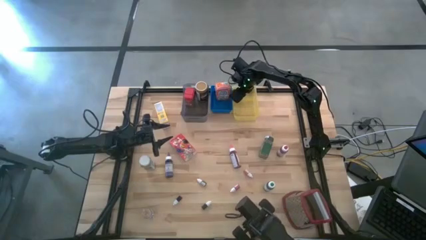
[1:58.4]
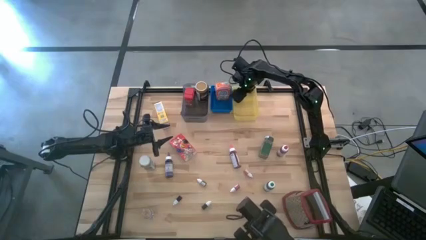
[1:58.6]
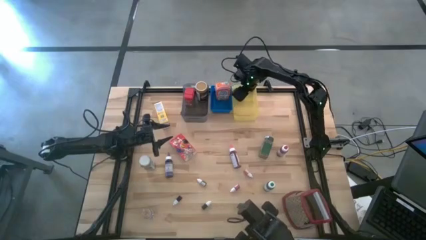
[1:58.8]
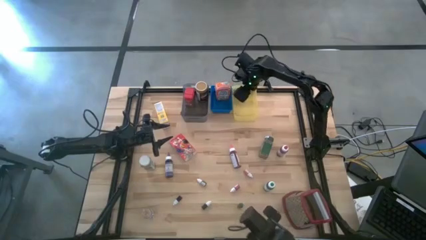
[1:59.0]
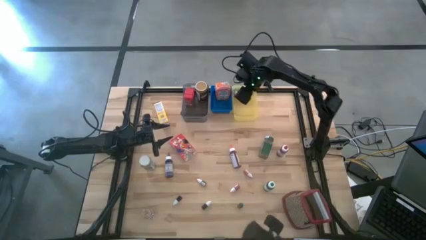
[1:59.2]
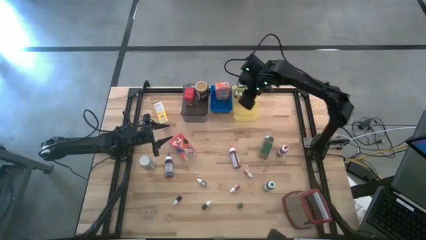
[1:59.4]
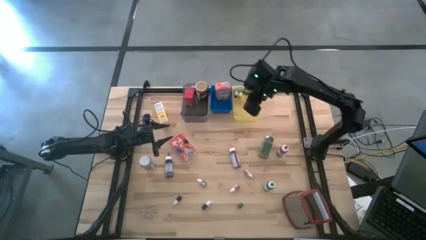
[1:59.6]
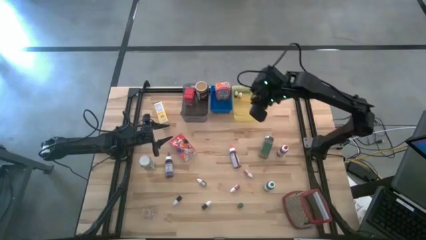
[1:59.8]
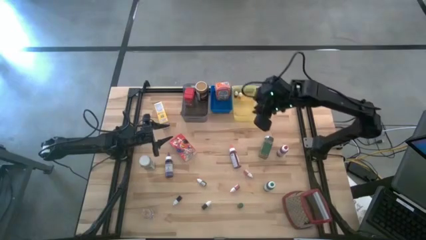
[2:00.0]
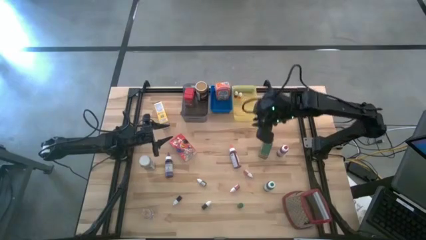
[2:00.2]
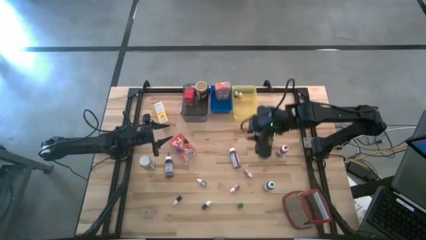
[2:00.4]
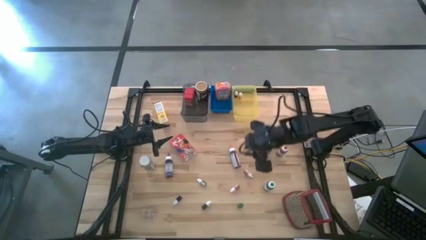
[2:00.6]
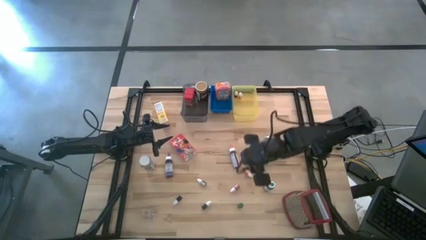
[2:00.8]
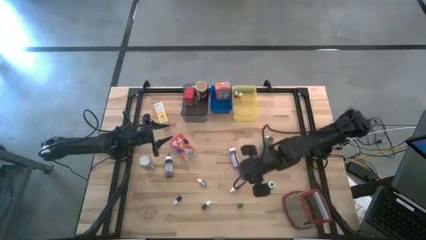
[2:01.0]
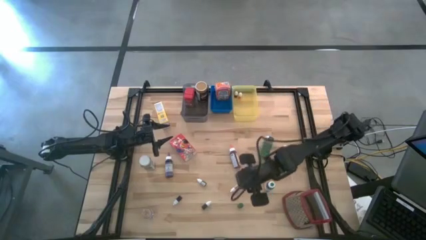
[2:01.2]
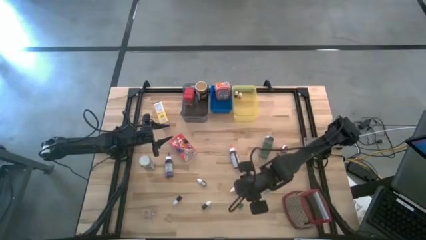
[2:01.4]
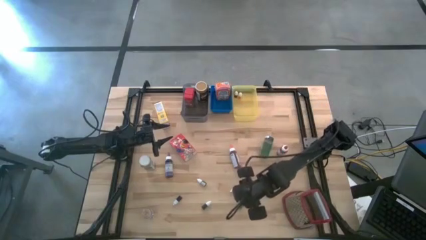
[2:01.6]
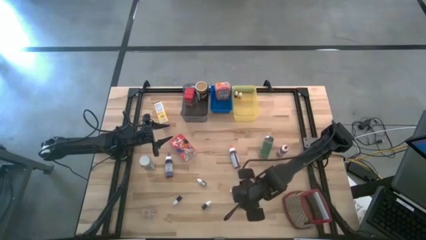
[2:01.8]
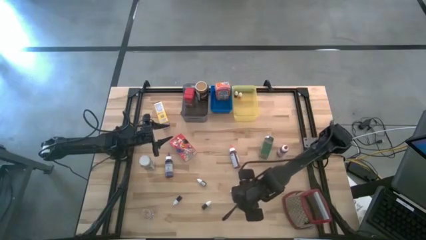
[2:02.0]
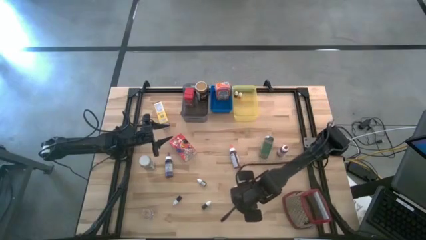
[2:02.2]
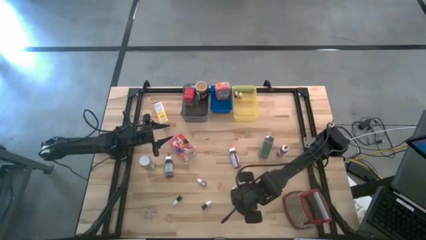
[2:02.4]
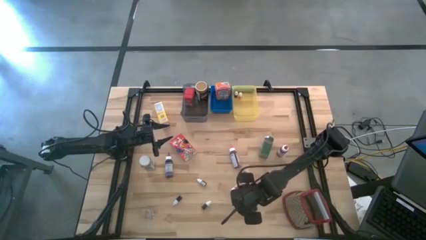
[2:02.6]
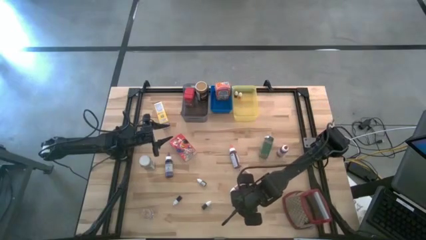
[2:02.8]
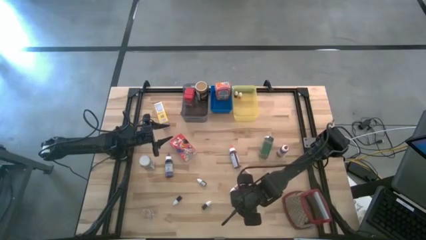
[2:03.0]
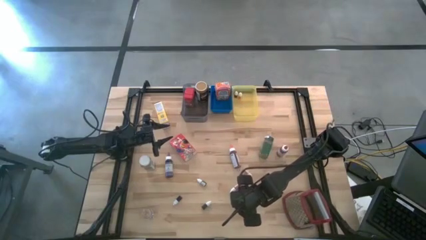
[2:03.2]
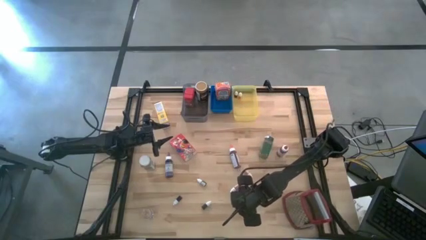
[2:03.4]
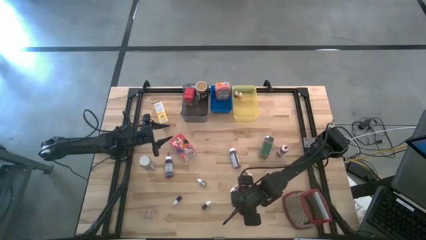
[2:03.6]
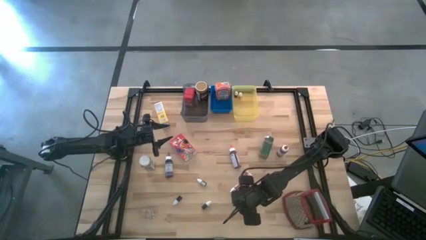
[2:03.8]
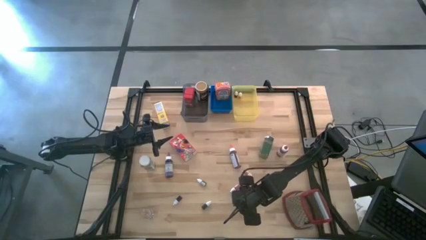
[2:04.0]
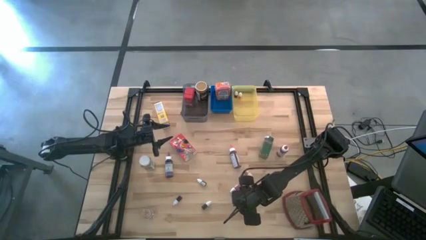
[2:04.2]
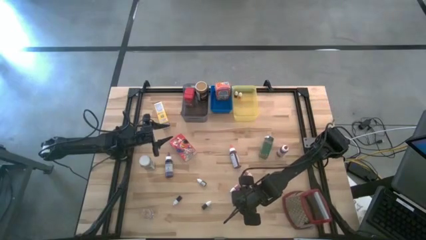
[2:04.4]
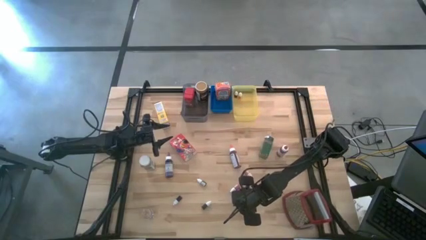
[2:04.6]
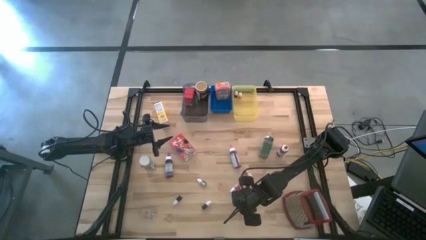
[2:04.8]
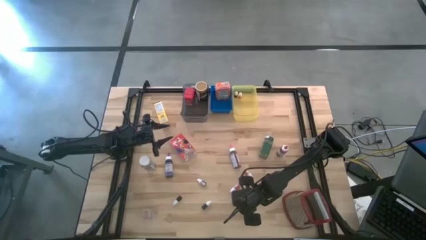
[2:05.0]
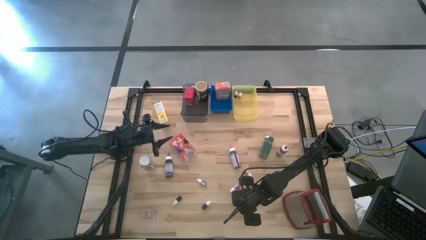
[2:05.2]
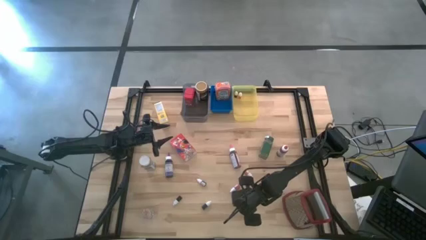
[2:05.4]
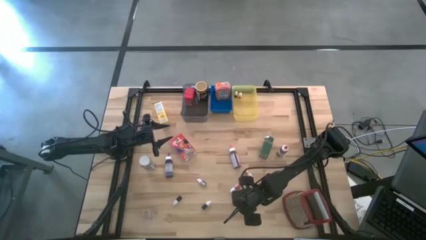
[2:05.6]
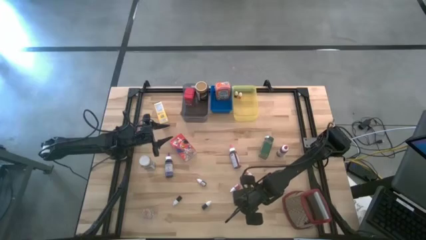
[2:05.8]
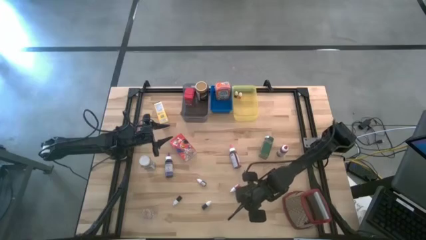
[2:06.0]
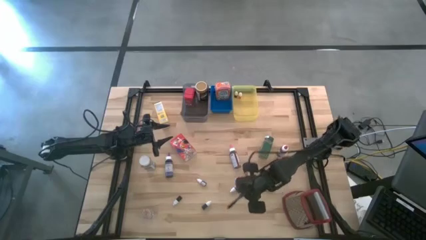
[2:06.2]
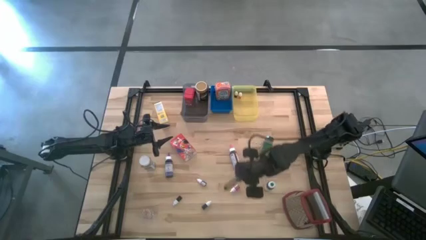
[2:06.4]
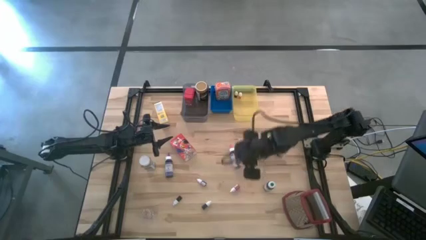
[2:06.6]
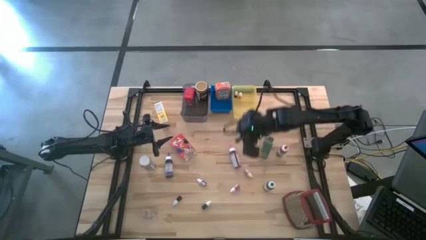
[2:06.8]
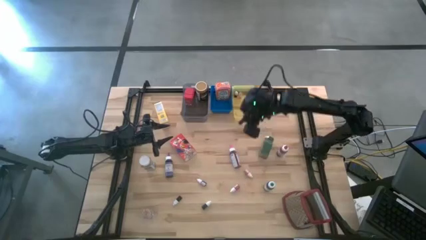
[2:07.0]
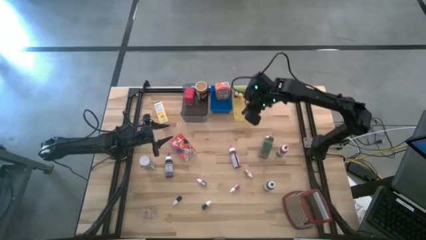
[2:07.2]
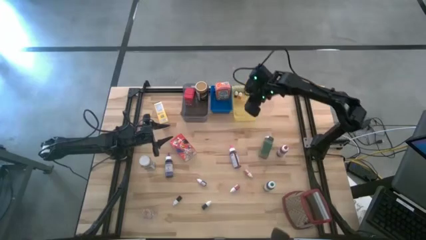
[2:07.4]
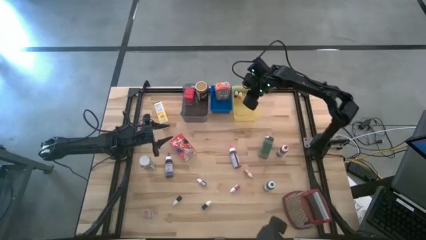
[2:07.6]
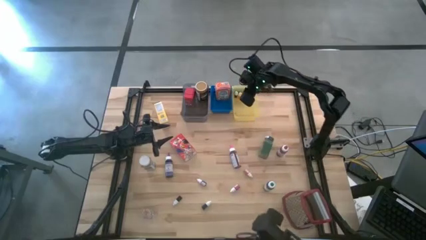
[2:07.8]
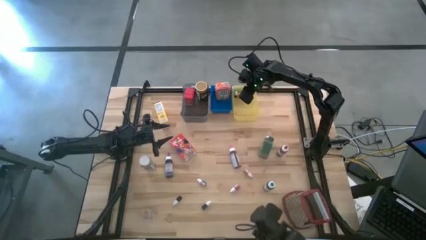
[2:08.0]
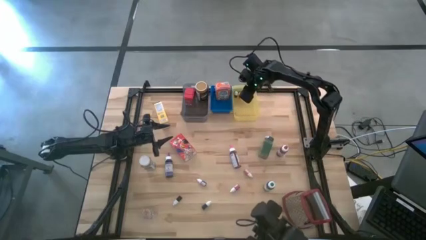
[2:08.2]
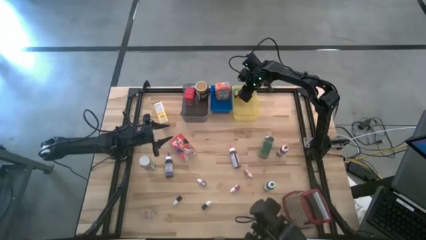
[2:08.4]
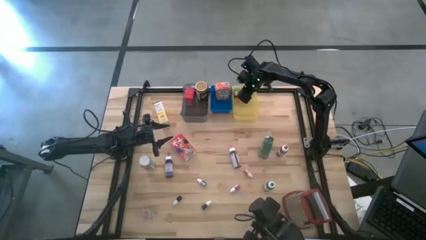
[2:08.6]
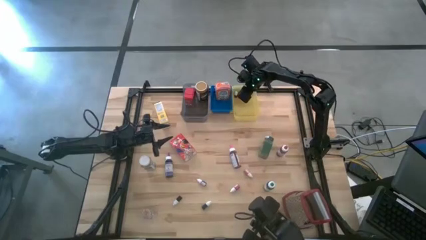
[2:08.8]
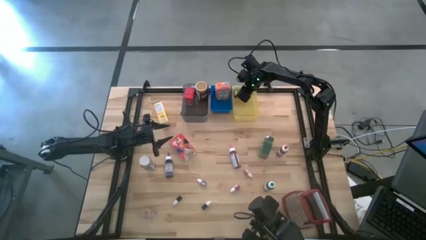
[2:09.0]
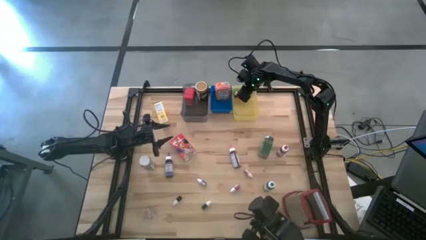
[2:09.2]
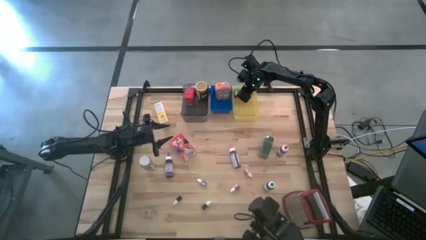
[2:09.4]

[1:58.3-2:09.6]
Task: Pick & Place Kitchen Items
Put the dark green food coloring bottle into the yellow bin

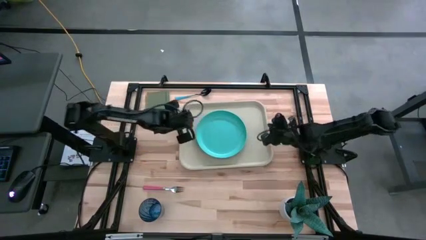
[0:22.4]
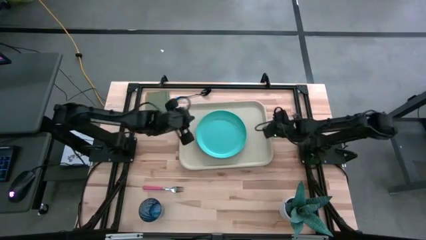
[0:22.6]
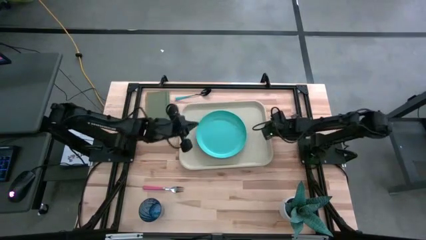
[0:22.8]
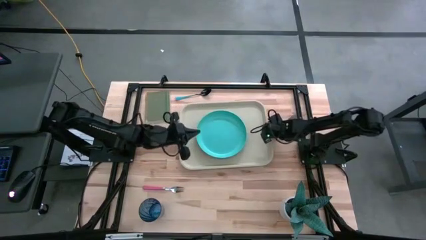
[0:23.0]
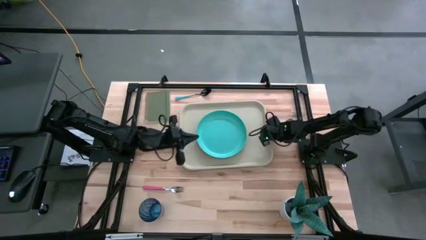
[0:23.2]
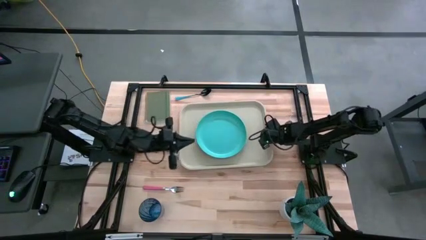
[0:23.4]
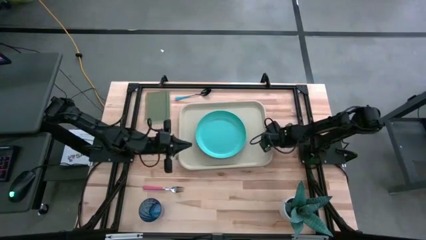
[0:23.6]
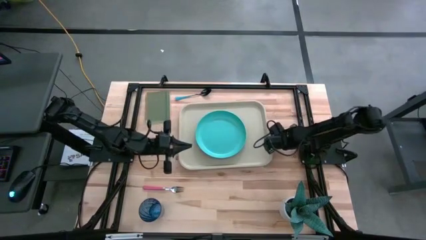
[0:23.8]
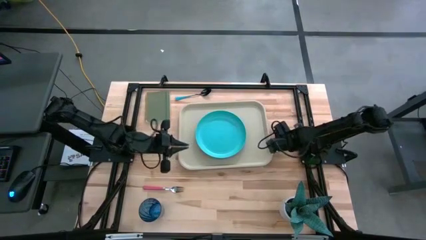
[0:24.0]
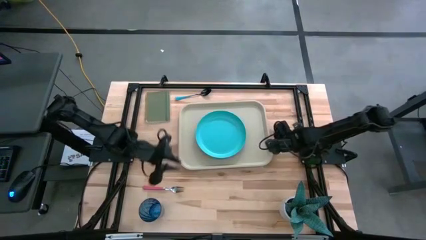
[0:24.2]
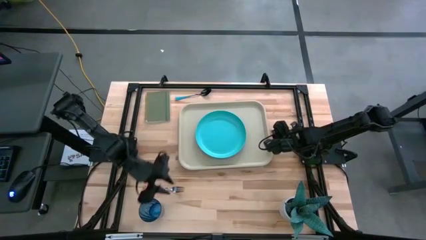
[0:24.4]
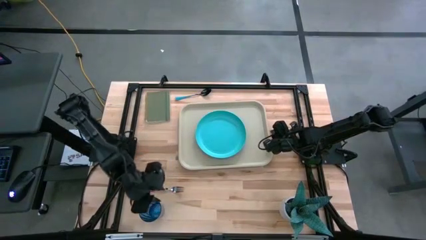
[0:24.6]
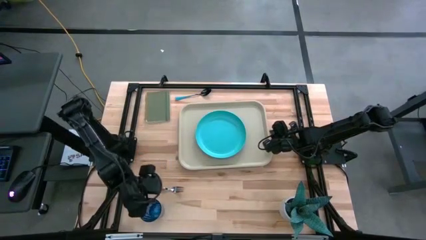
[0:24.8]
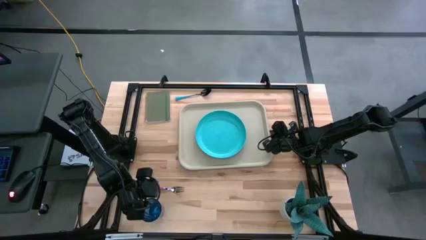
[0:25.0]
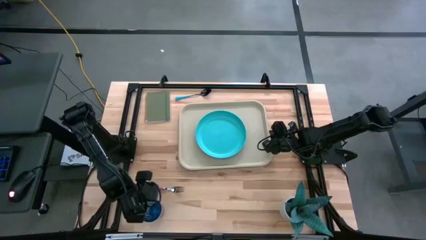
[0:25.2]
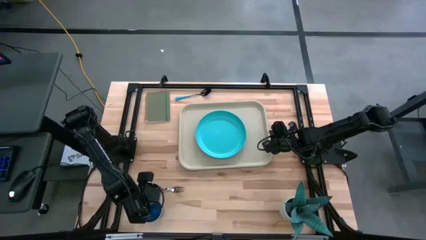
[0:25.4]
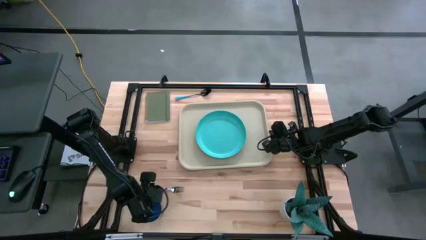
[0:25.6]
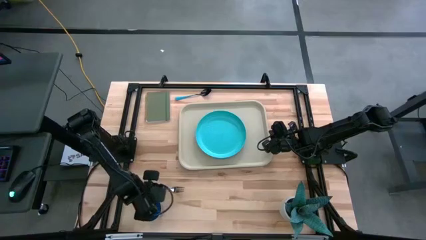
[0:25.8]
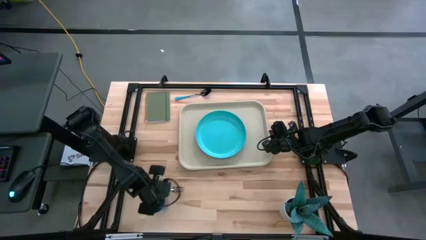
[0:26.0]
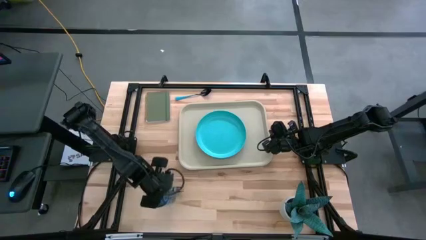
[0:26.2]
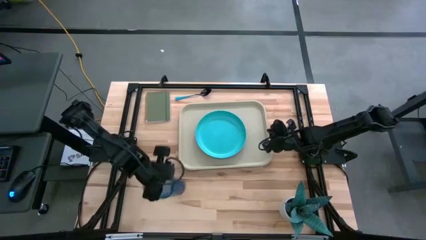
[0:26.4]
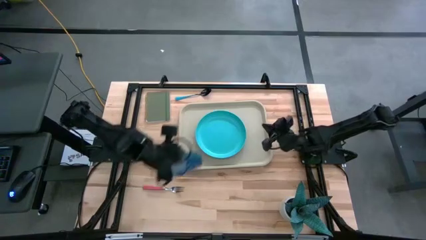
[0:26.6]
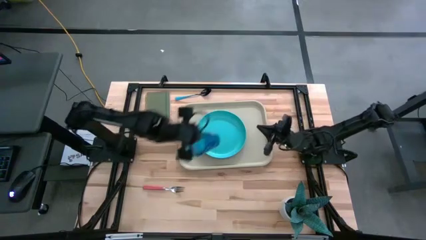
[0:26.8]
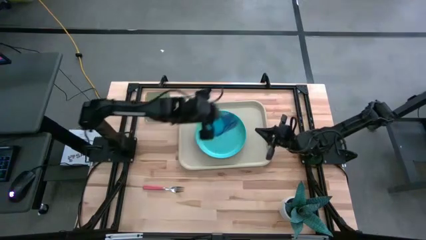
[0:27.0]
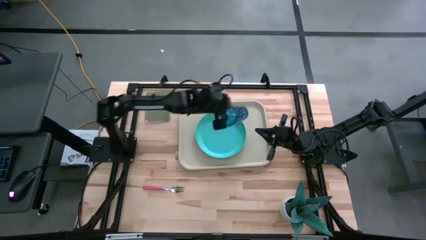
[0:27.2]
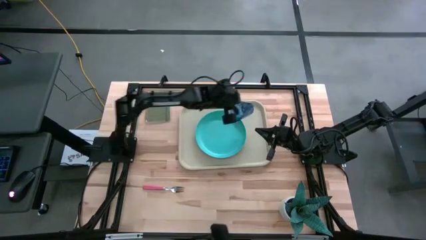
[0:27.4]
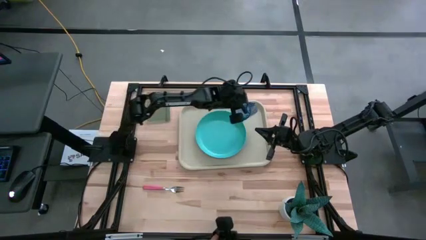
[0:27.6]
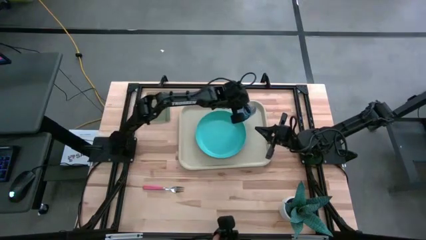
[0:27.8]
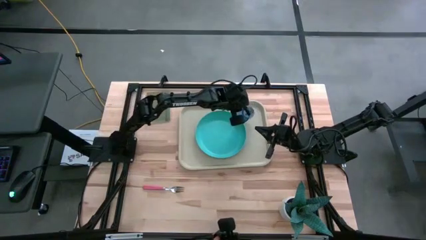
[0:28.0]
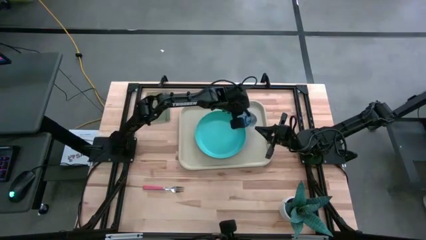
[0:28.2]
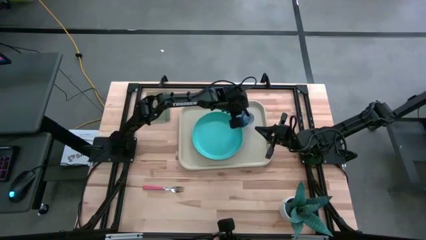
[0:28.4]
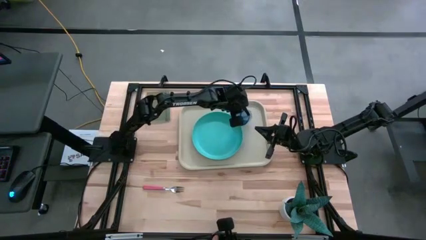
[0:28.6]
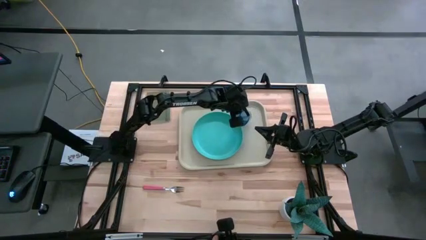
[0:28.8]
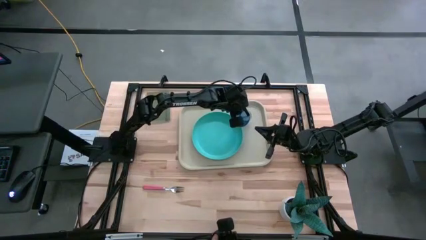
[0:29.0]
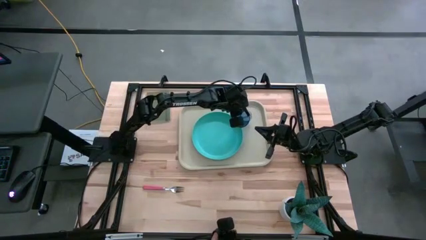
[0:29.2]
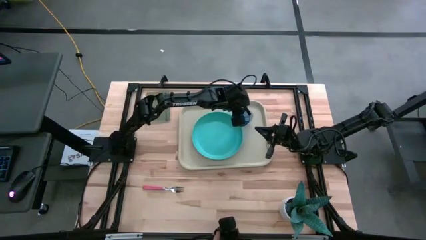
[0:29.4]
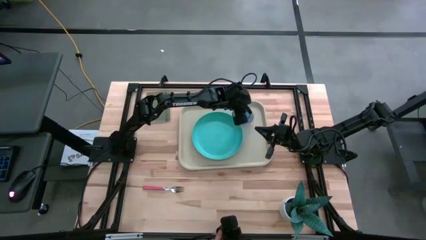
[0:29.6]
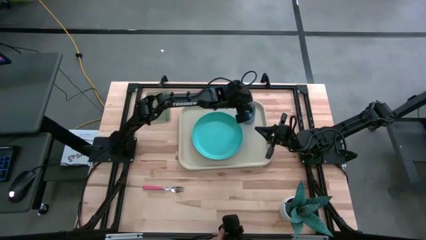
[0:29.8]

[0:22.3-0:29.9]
Task: Pick and place plate/cup/fork/spoon on tray
Put the blue cup to the top right side of the gray serving tray
